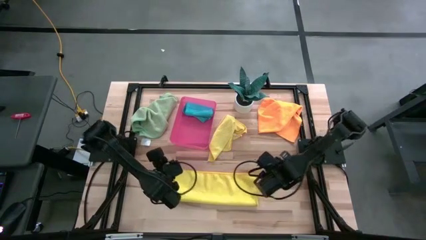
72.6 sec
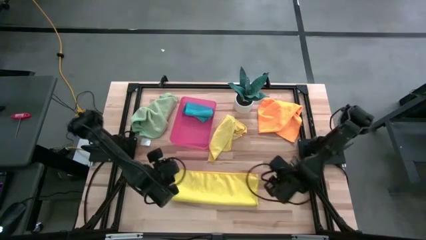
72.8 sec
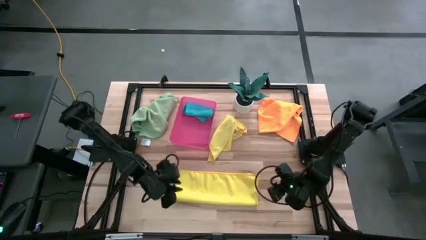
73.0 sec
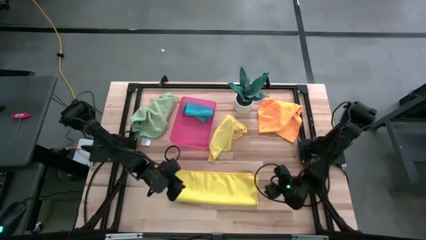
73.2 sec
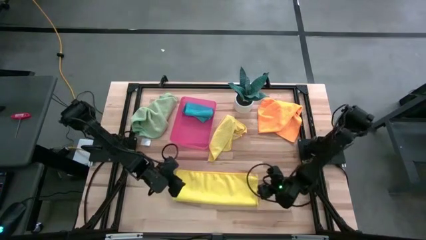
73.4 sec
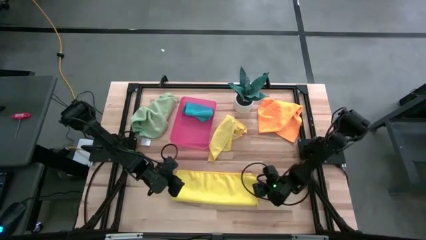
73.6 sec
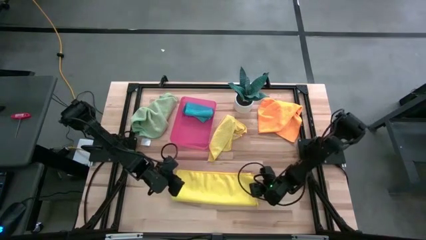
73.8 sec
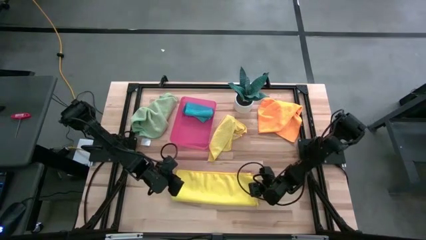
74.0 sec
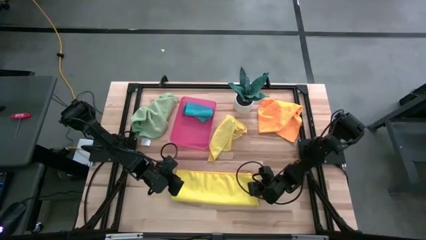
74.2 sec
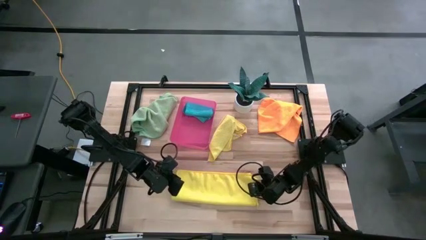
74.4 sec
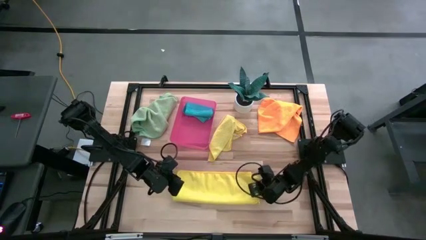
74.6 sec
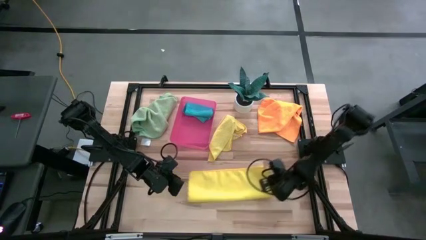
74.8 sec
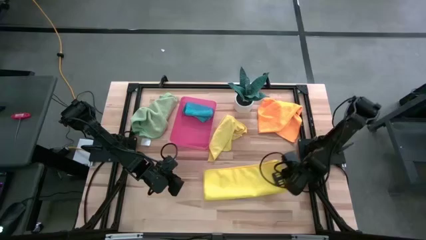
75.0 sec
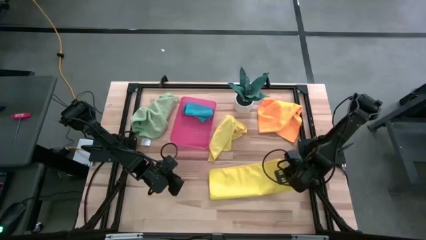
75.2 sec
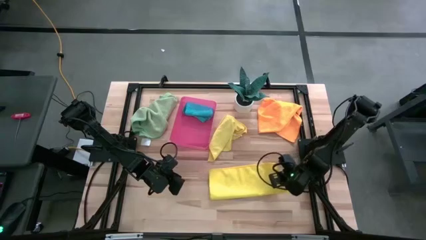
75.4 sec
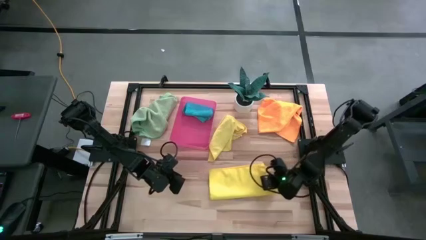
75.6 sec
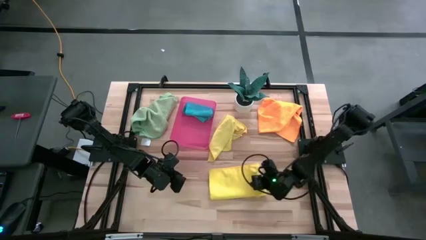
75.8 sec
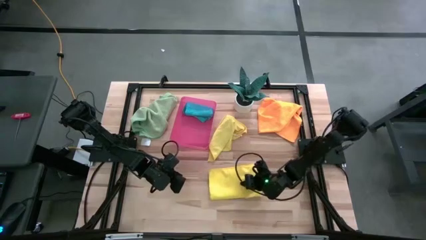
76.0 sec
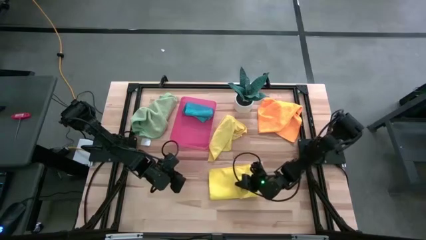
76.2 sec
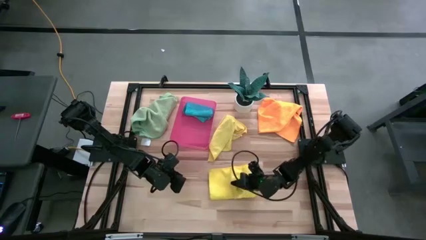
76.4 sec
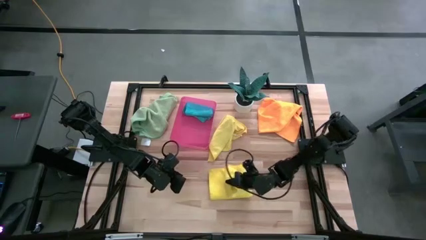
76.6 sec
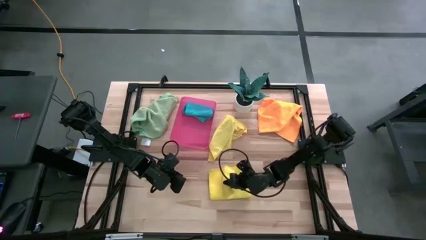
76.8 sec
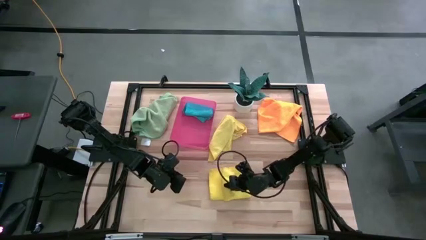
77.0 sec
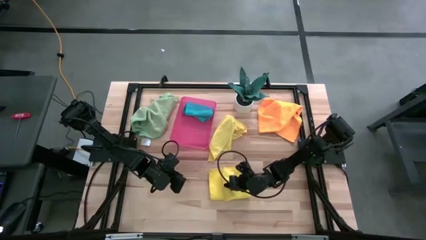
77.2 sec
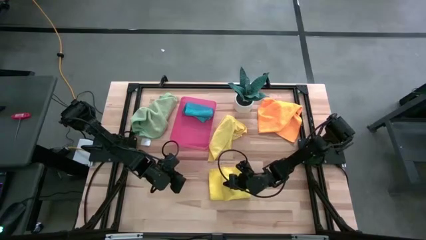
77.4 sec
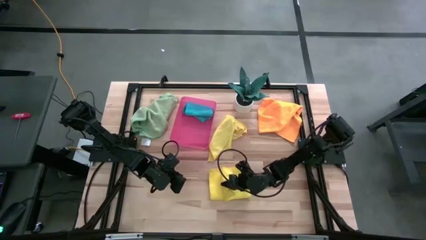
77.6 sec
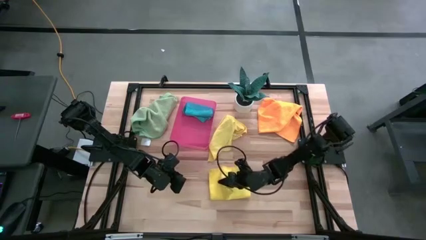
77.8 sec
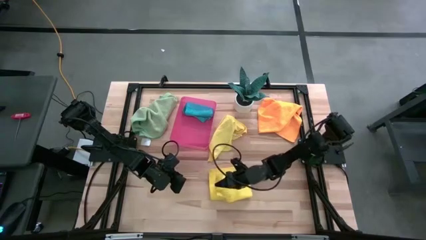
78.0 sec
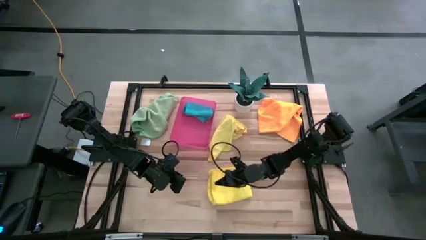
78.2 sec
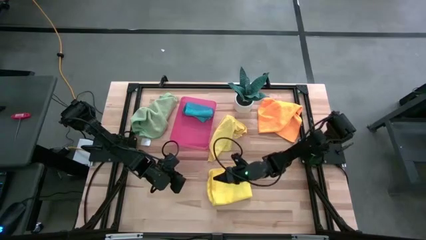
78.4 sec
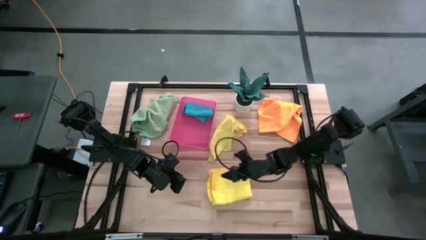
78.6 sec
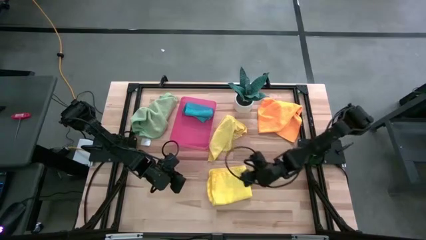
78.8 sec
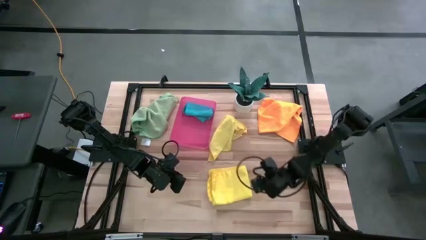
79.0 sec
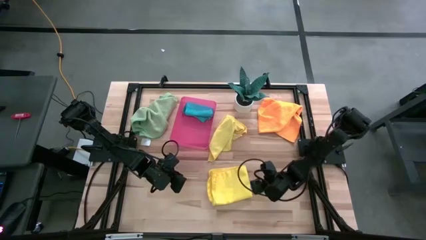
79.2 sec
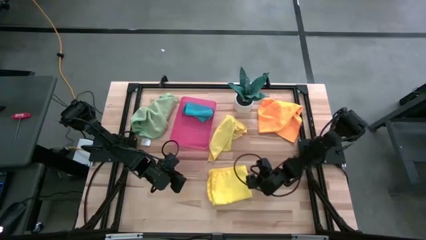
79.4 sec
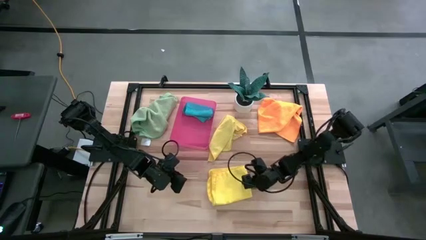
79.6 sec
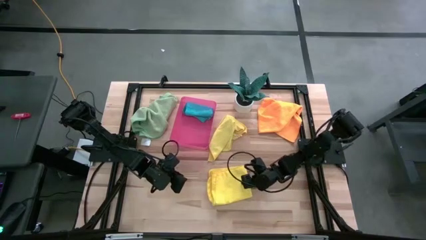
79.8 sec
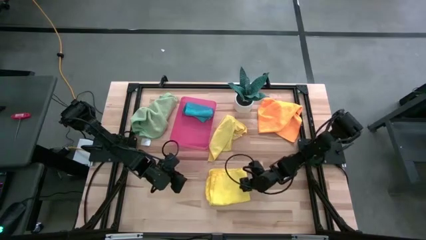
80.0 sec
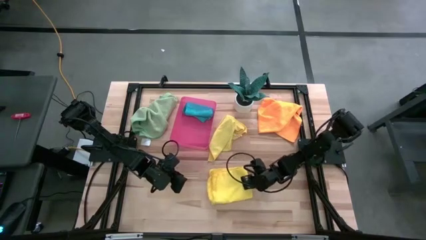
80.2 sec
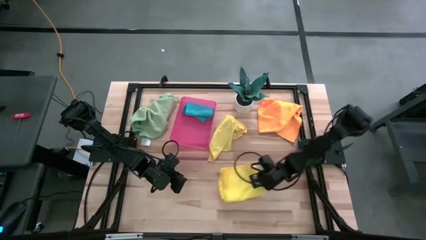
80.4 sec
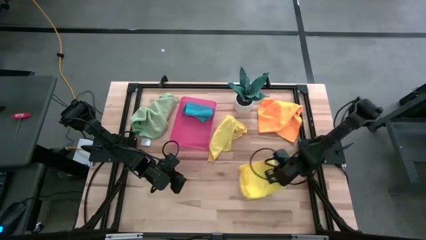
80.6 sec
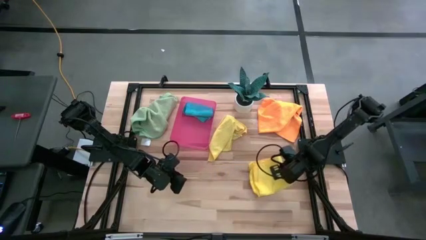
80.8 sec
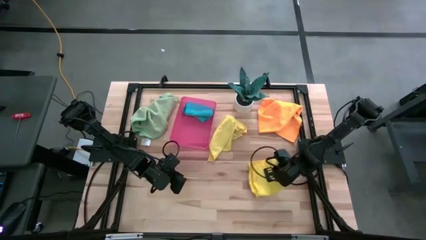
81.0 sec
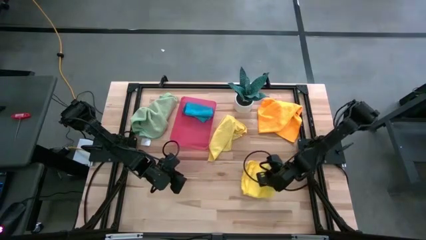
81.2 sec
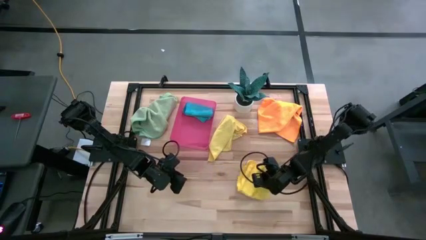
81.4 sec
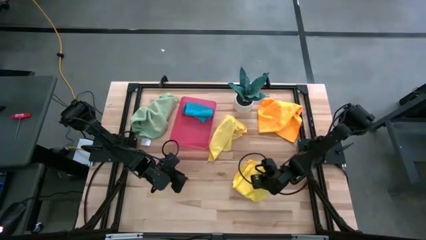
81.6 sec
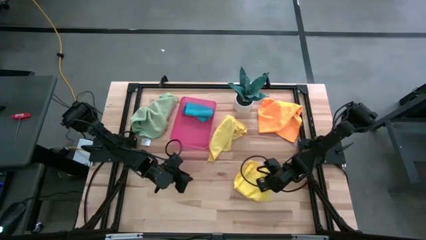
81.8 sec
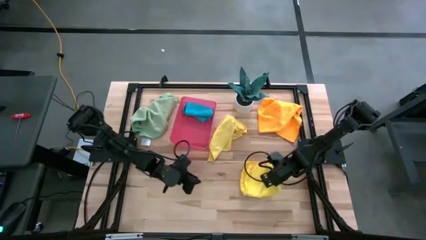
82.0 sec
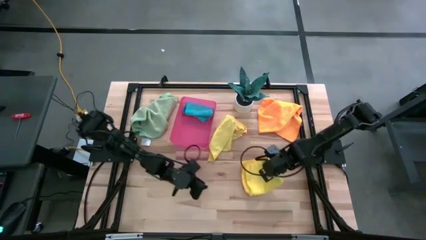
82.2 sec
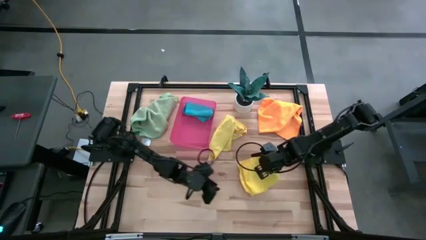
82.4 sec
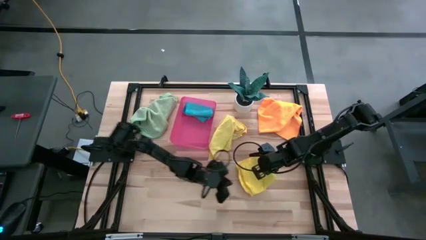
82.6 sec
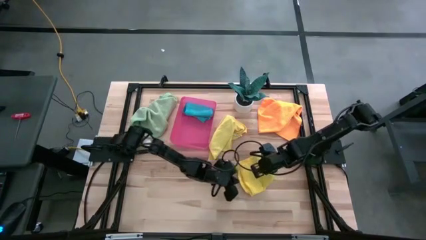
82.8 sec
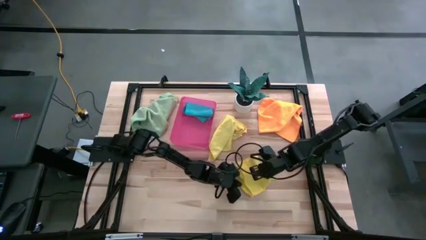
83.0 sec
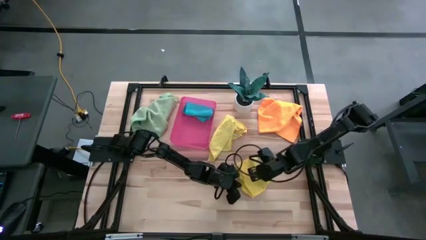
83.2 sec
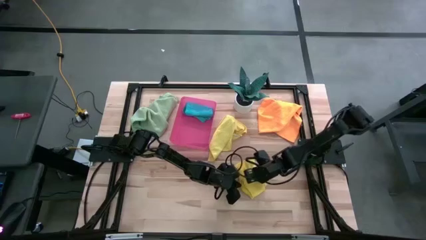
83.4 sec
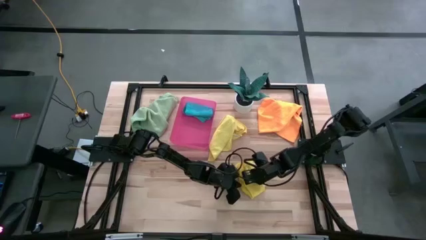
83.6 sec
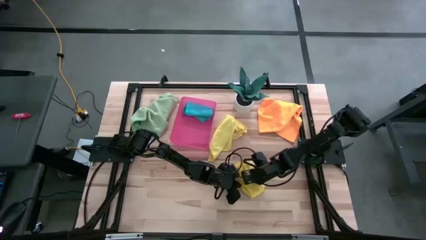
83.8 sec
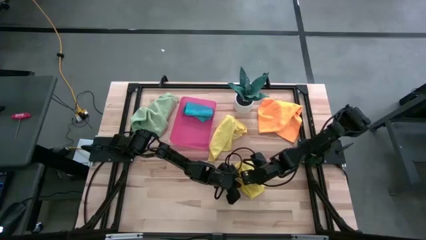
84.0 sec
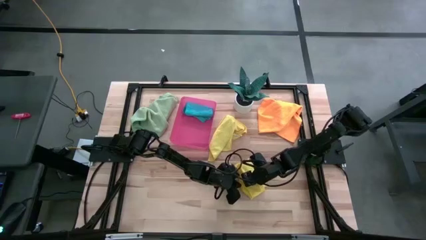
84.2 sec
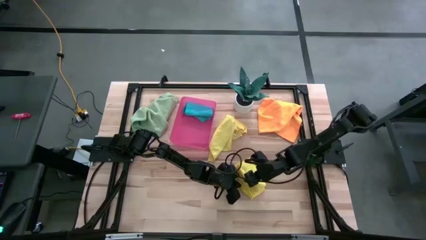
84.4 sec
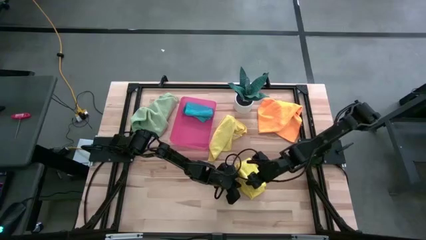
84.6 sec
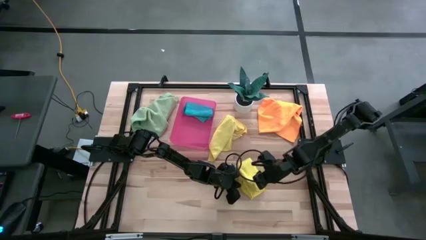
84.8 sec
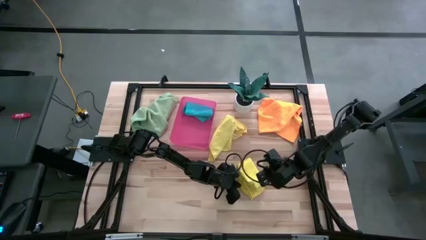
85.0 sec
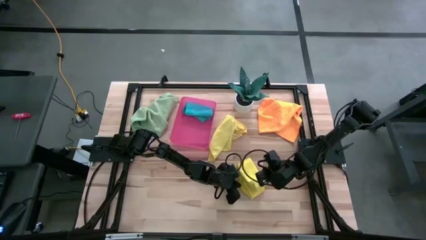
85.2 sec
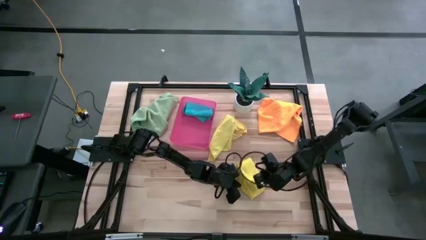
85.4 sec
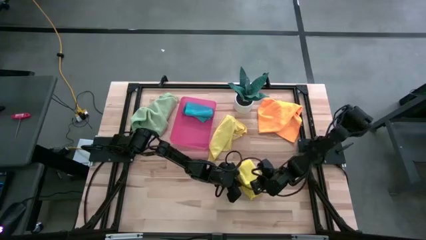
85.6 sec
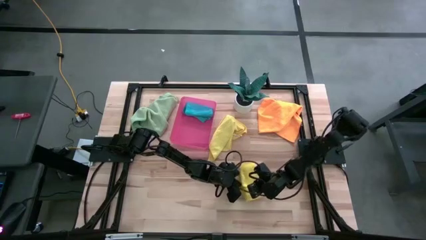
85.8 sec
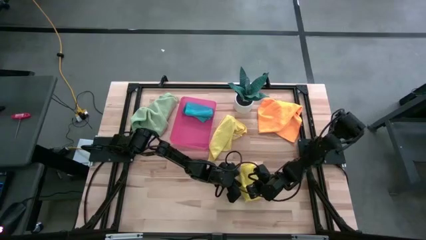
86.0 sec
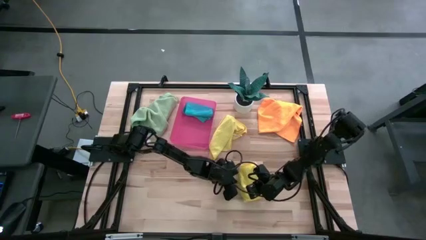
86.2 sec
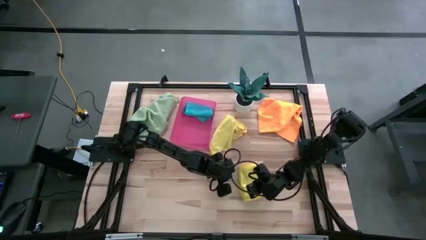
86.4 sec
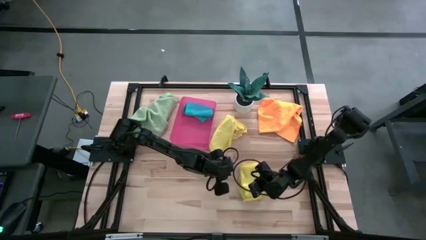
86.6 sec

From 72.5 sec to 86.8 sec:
Task: Fold microfiber towels
Fold the bottom yellow microfiber cloth

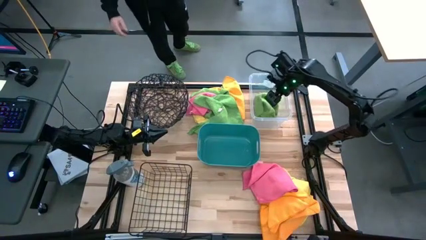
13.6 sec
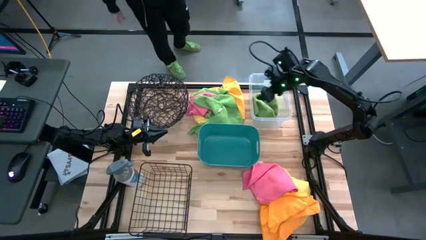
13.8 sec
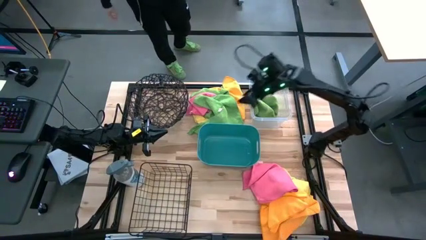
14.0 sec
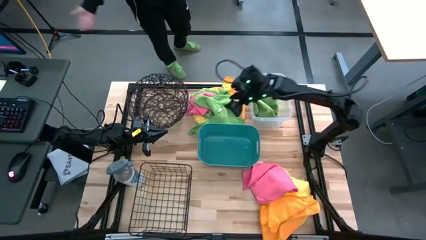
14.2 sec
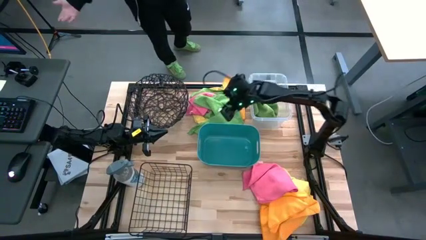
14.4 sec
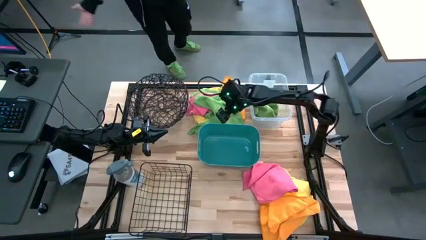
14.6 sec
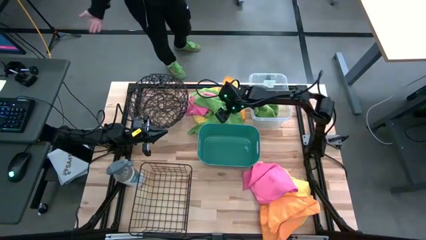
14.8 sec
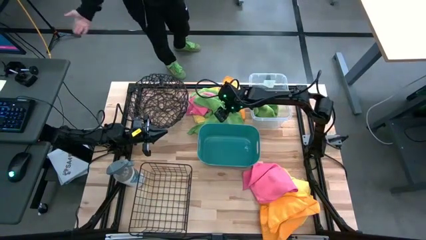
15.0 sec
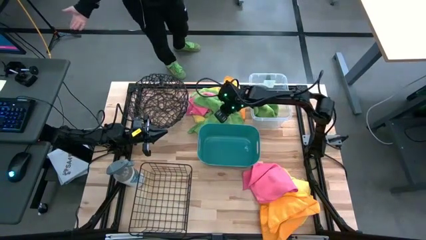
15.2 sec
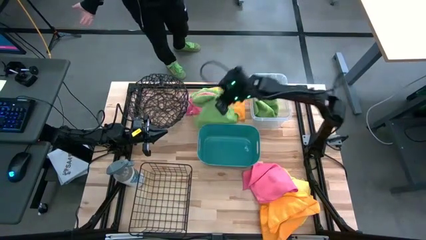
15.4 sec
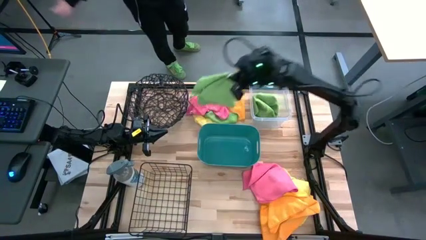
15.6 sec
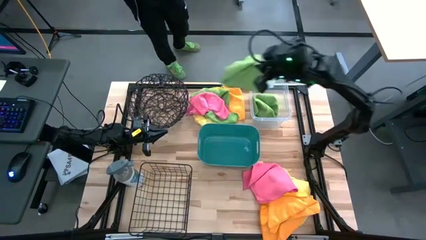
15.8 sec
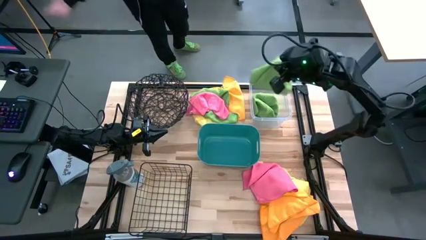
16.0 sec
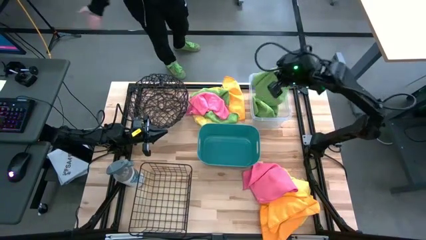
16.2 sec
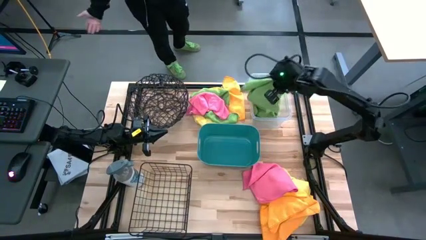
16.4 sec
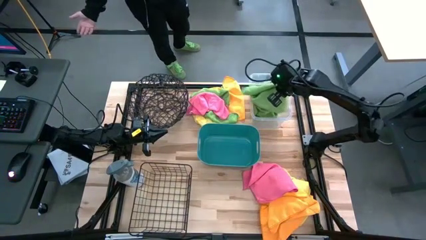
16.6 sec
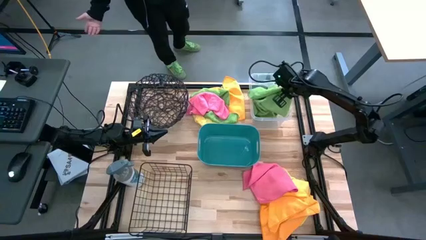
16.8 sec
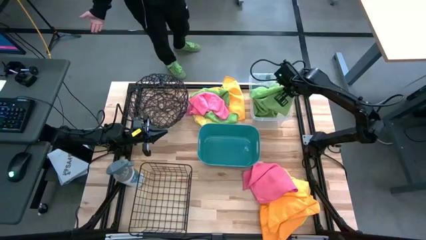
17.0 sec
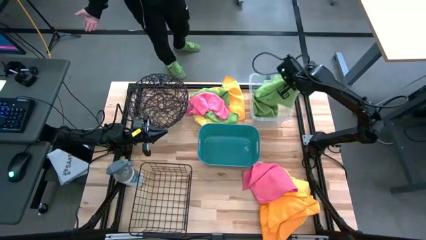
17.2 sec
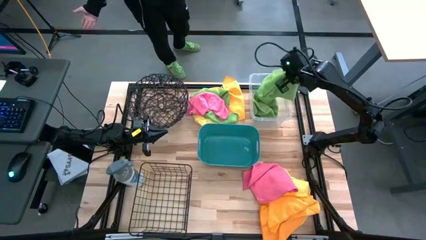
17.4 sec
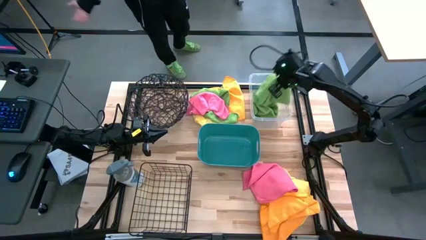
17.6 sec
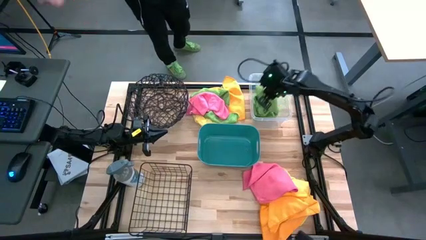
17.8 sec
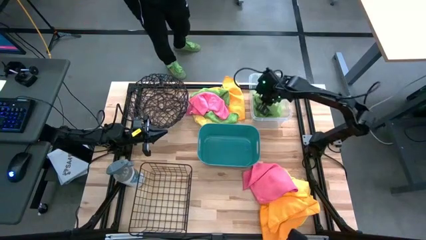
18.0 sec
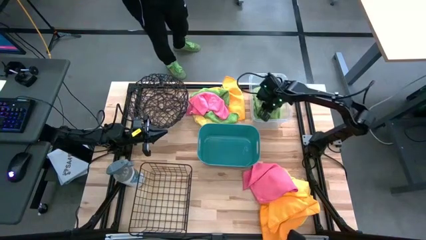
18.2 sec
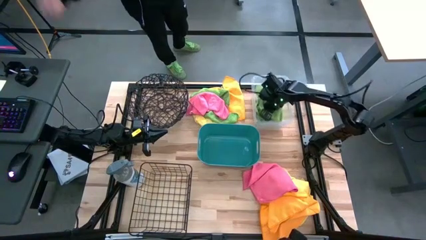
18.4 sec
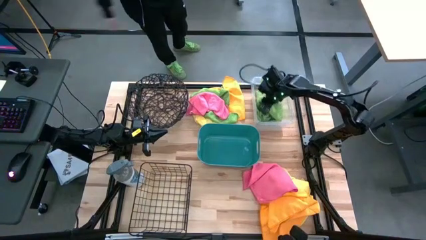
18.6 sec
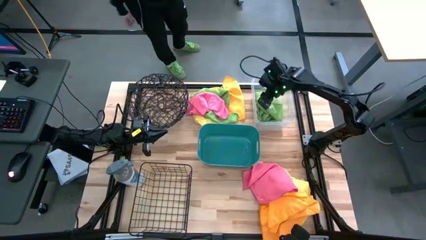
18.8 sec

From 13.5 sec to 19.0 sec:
Task: Sort microfiber towel by color & place in baskets
Put the green microfiber cloth into the transparent bin
